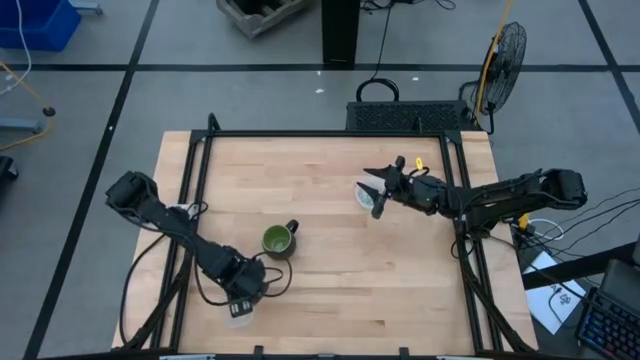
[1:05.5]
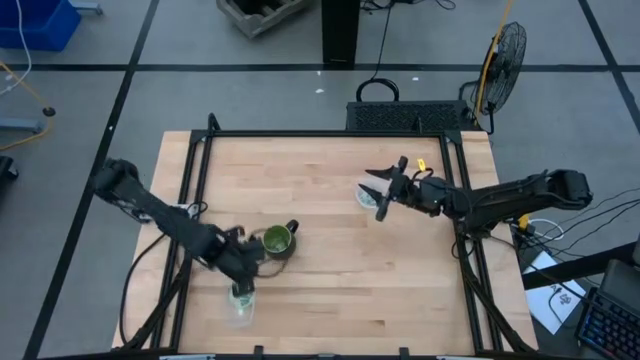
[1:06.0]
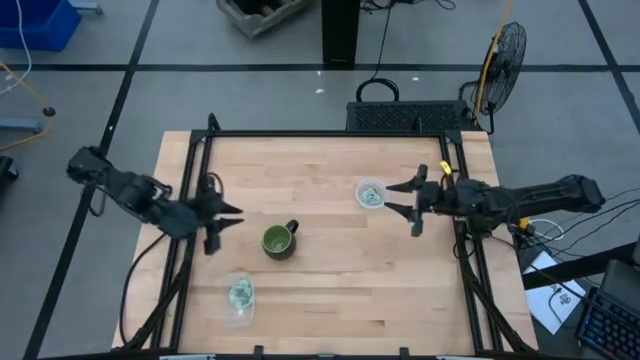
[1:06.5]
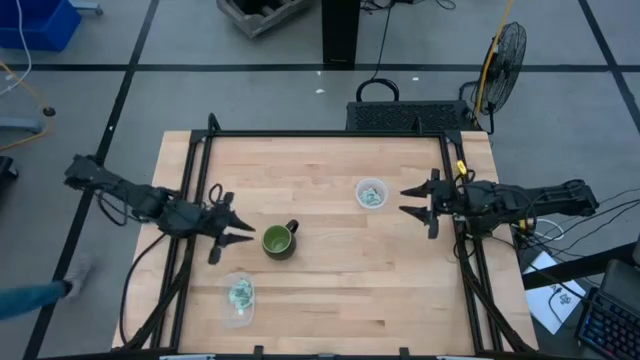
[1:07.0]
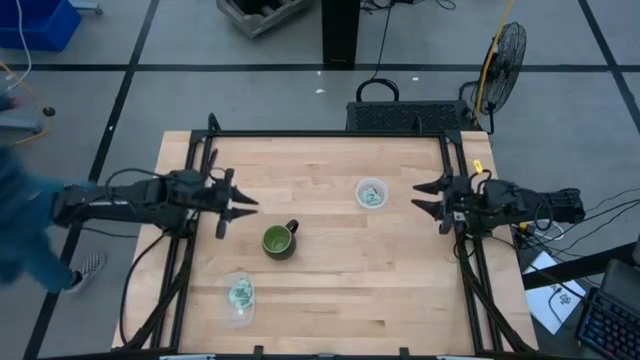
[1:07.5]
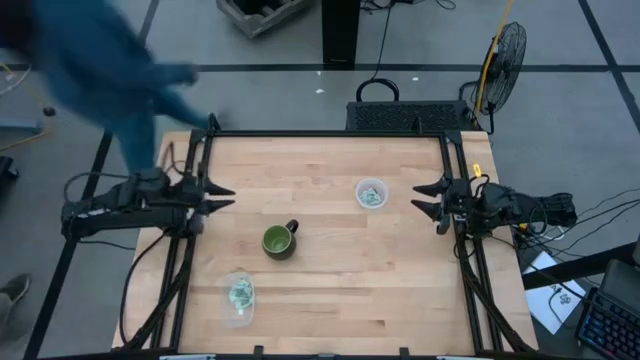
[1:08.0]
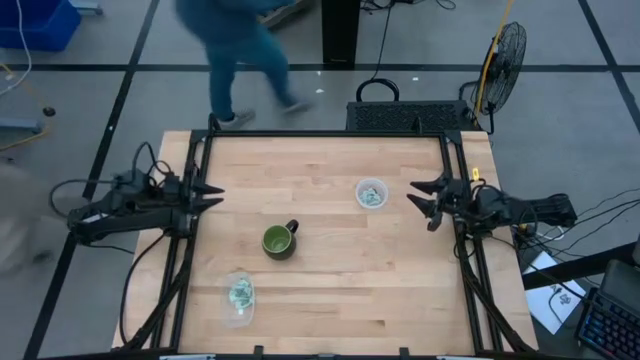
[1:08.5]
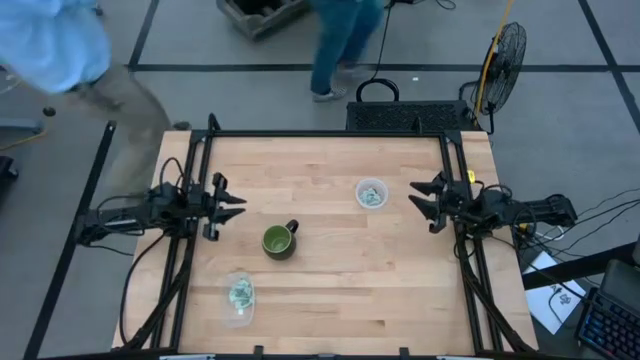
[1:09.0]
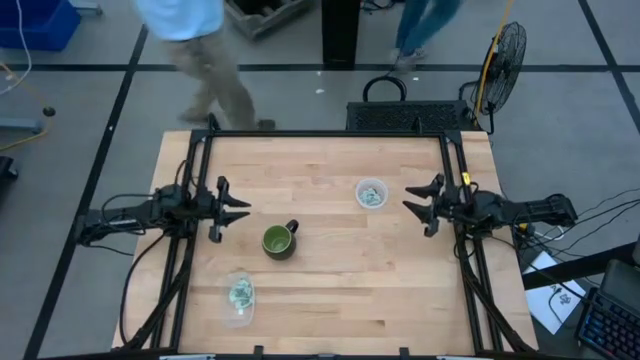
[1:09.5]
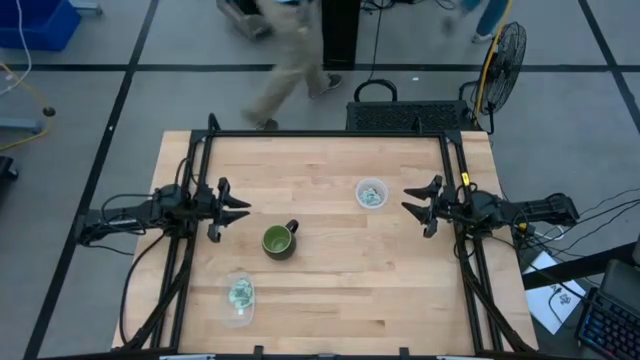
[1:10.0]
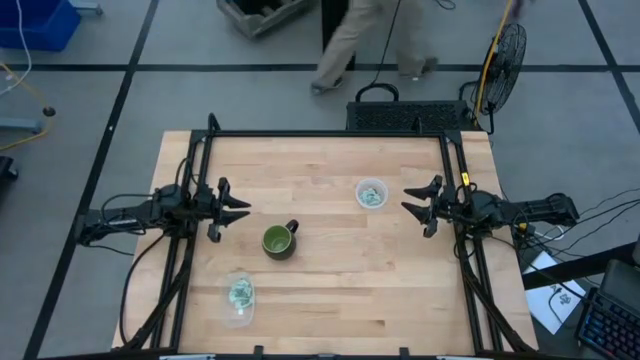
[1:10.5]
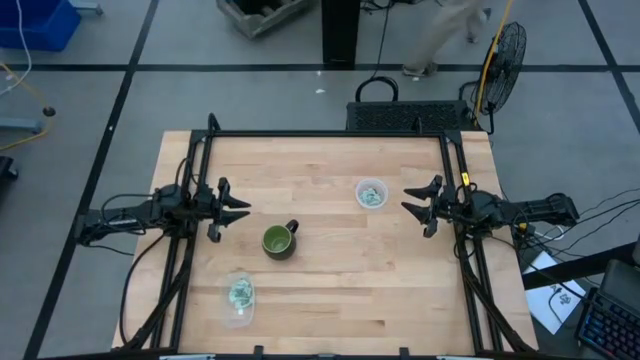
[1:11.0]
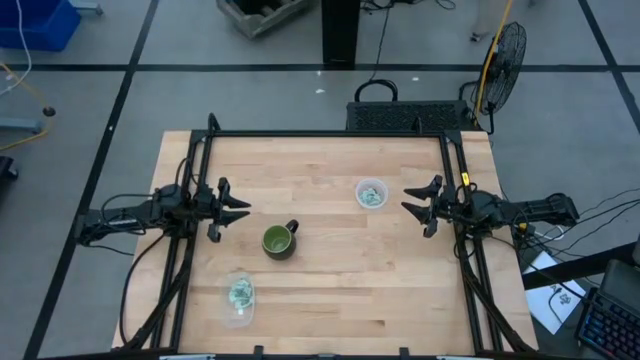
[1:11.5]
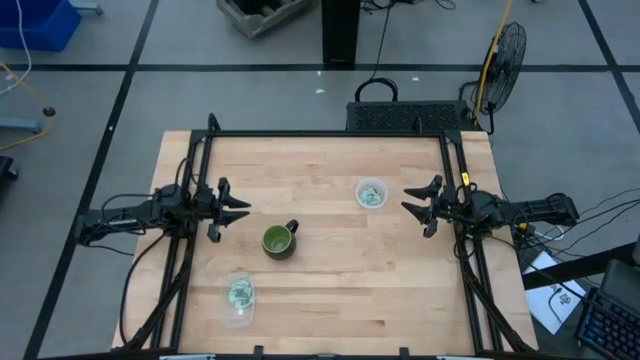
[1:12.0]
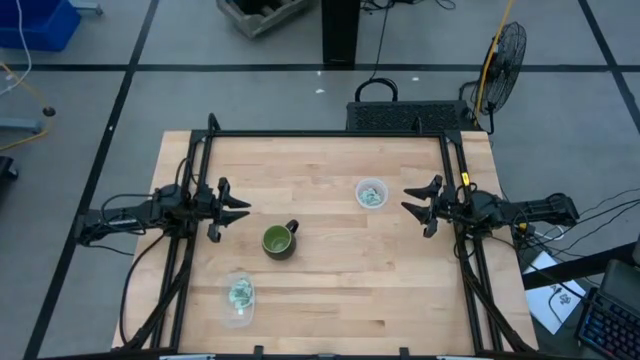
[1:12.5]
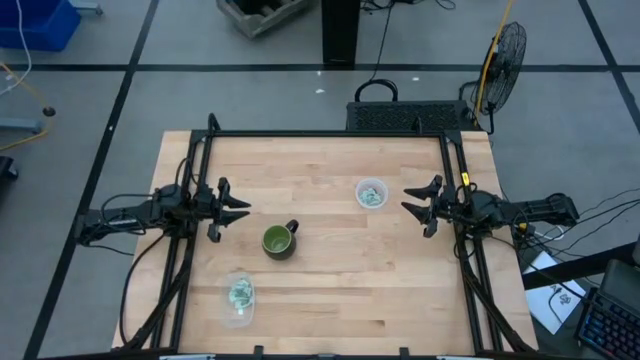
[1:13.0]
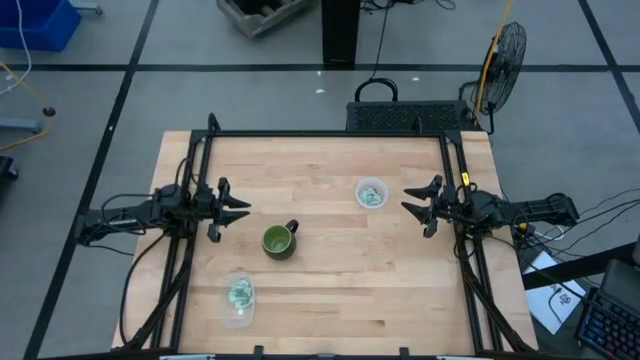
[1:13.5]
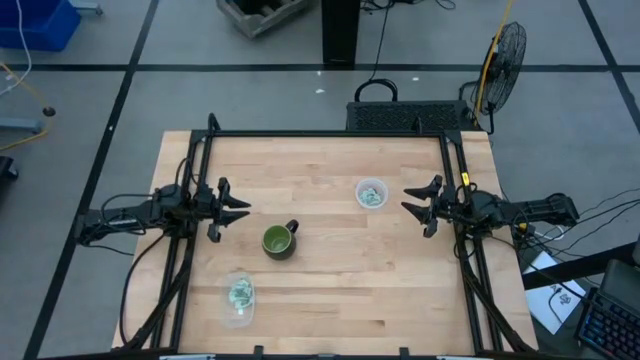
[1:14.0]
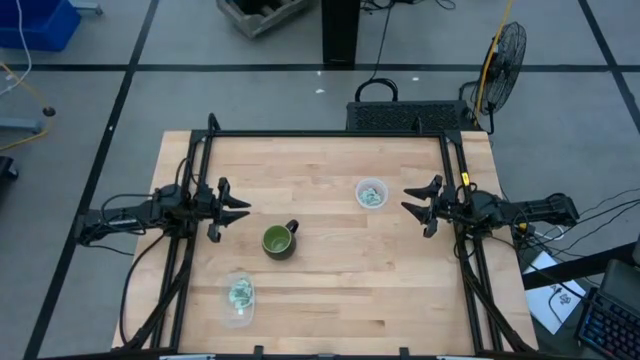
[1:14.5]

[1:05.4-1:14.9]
Task: Pick and place Stevia / Truvia into bins
Return to Home Position

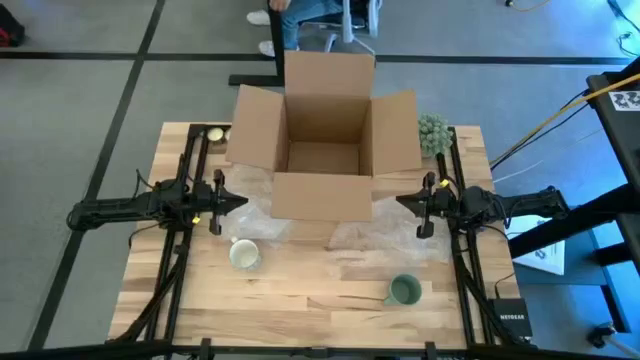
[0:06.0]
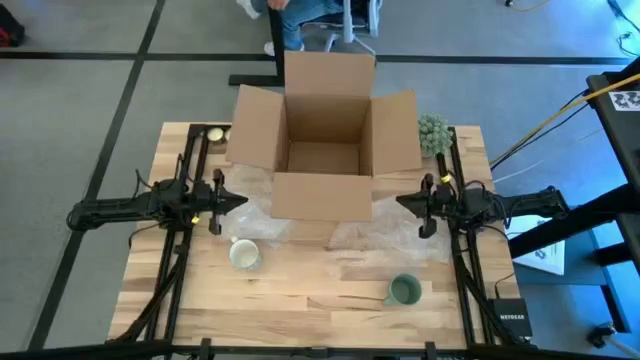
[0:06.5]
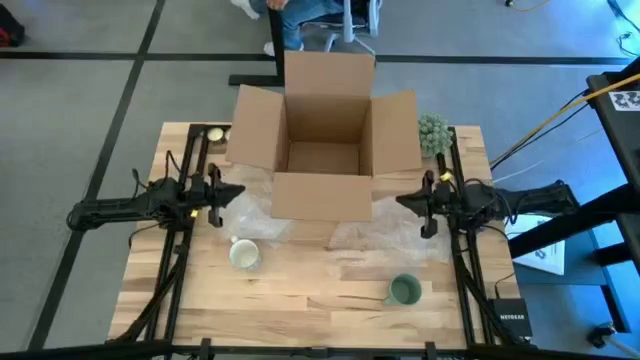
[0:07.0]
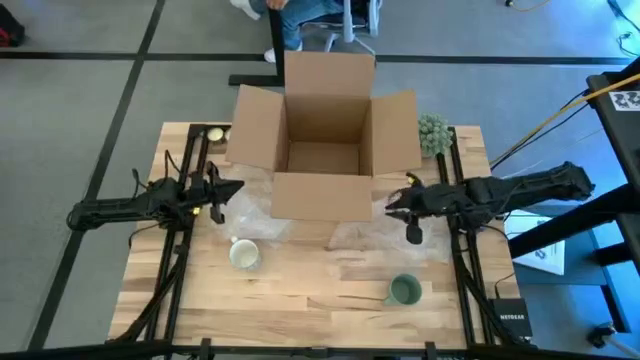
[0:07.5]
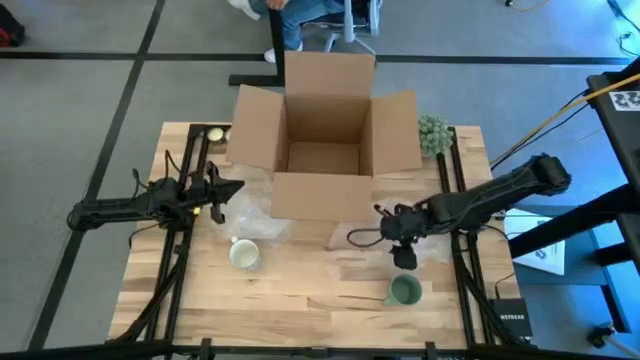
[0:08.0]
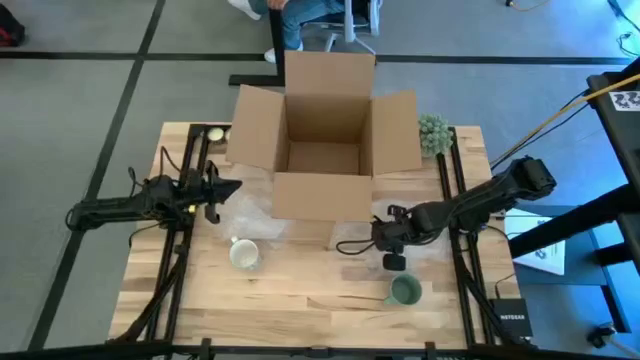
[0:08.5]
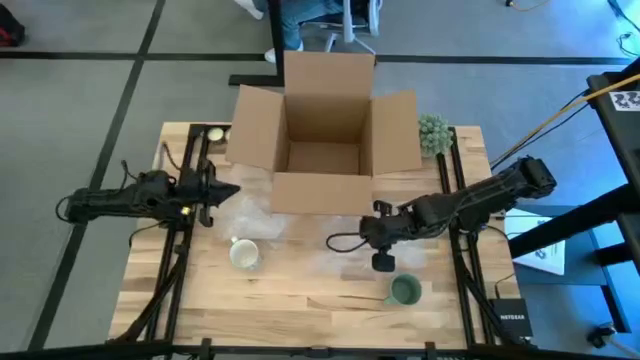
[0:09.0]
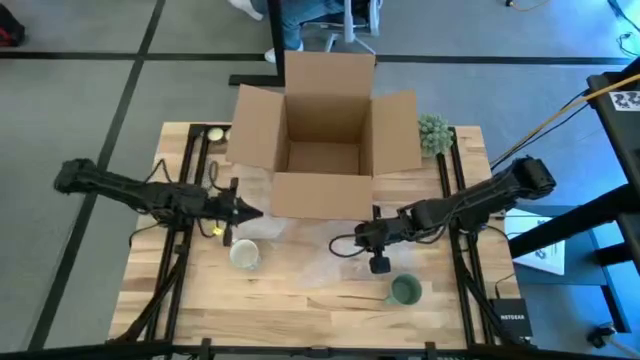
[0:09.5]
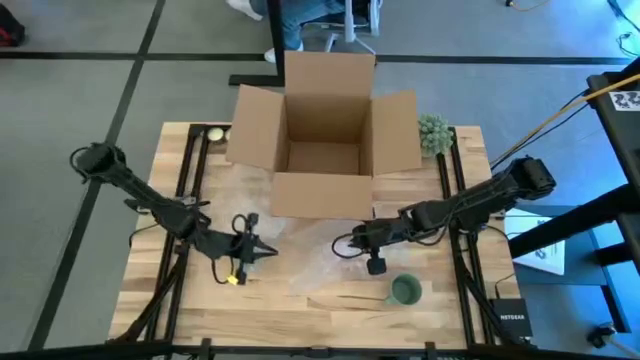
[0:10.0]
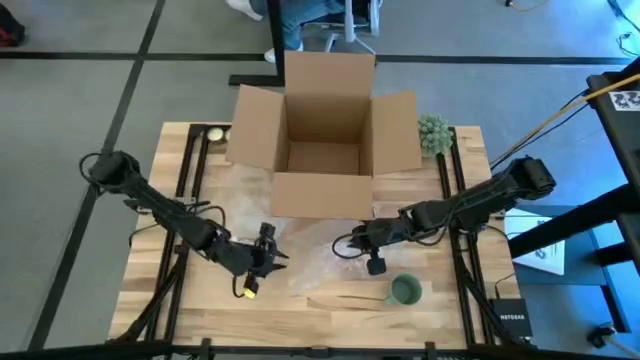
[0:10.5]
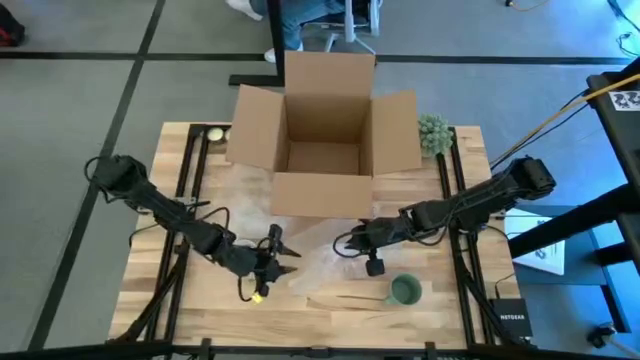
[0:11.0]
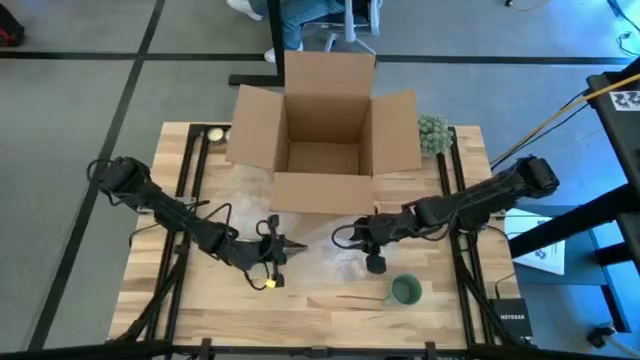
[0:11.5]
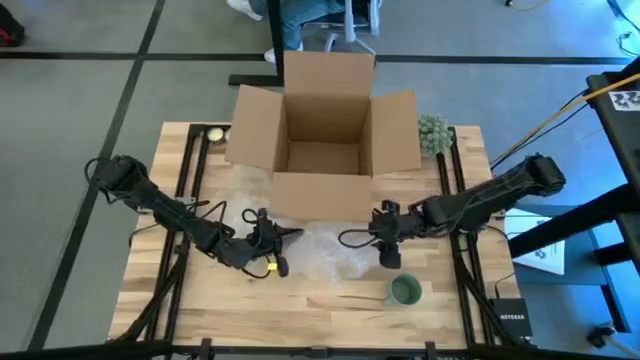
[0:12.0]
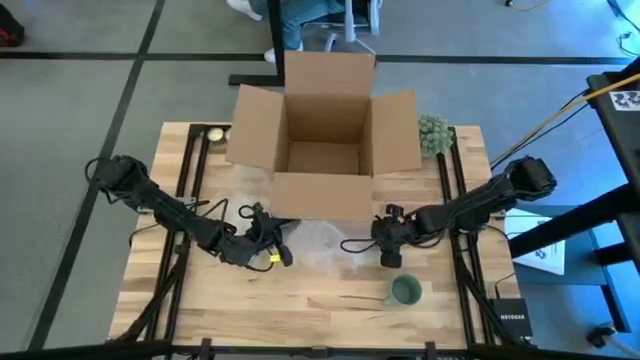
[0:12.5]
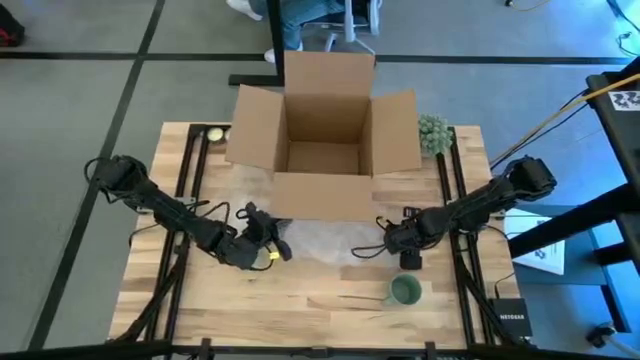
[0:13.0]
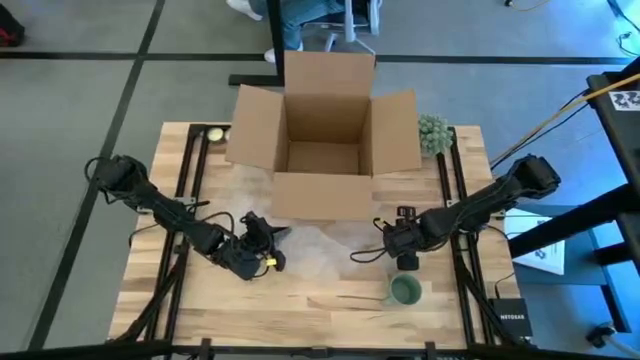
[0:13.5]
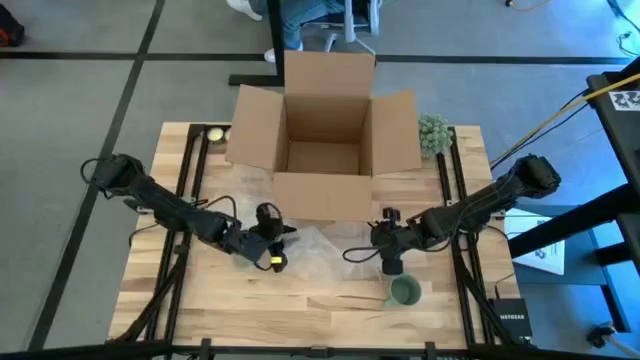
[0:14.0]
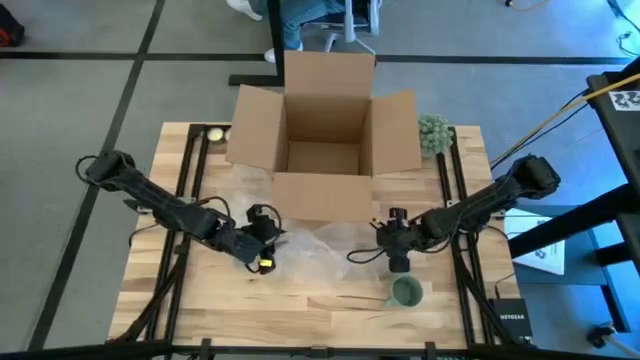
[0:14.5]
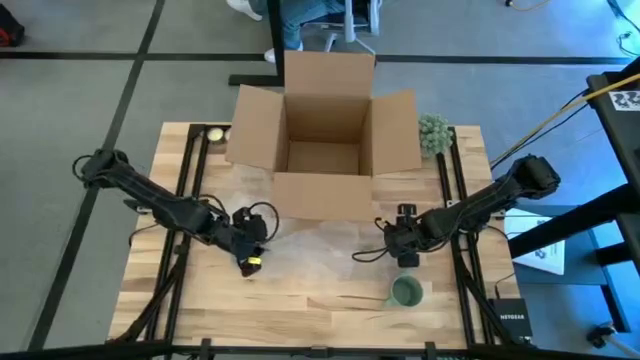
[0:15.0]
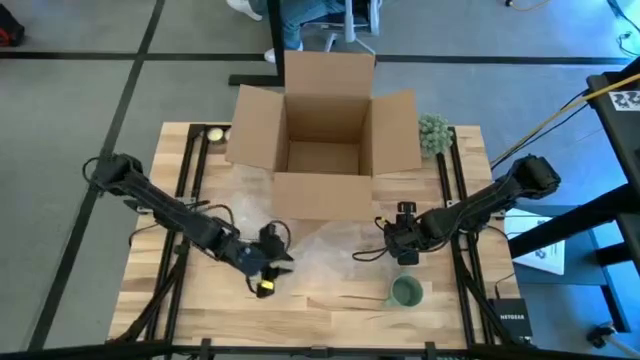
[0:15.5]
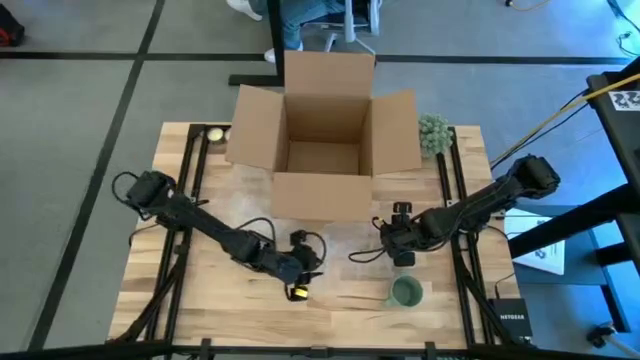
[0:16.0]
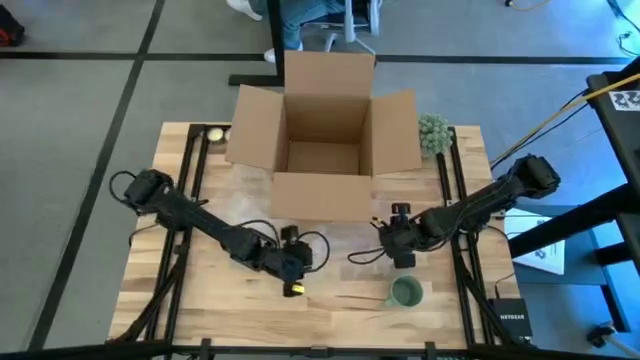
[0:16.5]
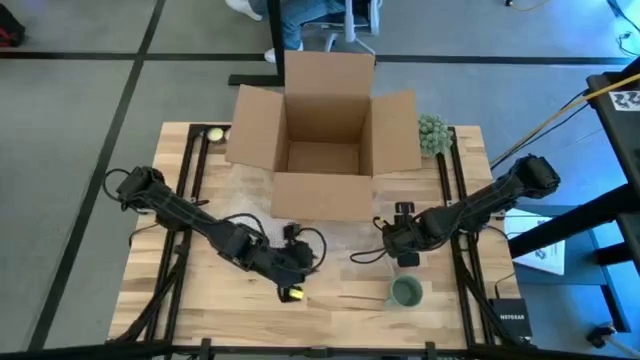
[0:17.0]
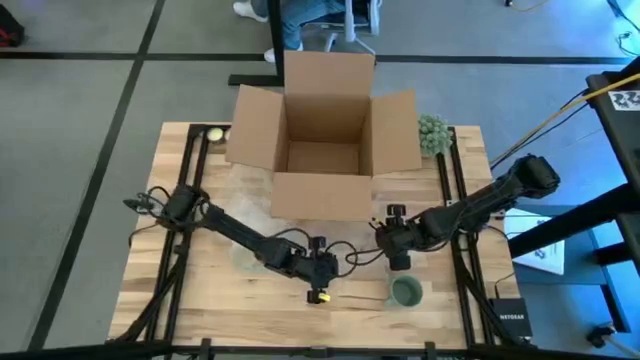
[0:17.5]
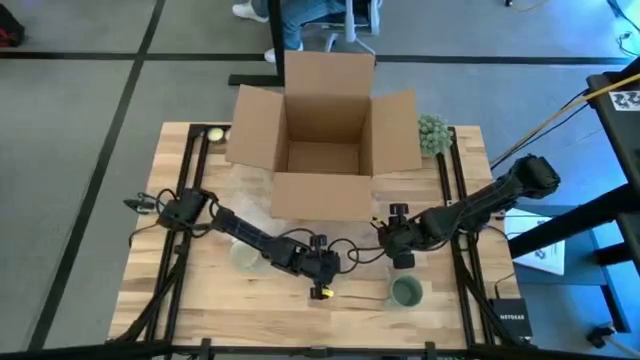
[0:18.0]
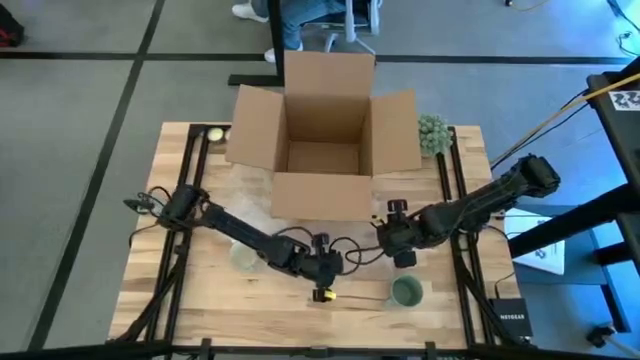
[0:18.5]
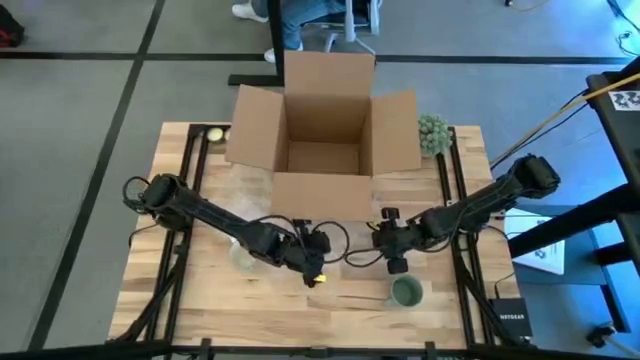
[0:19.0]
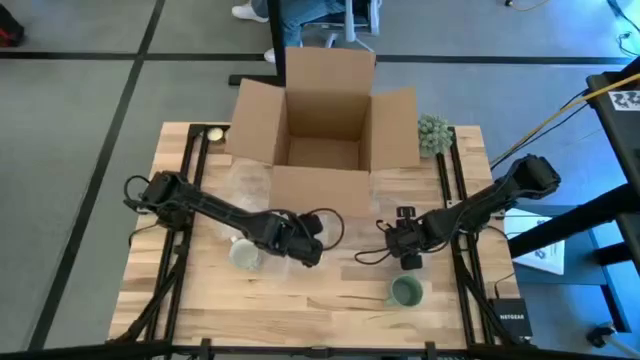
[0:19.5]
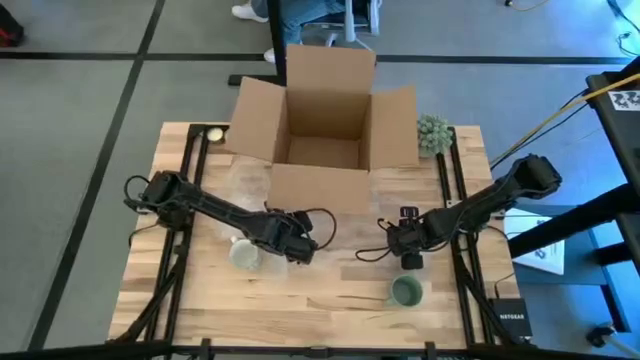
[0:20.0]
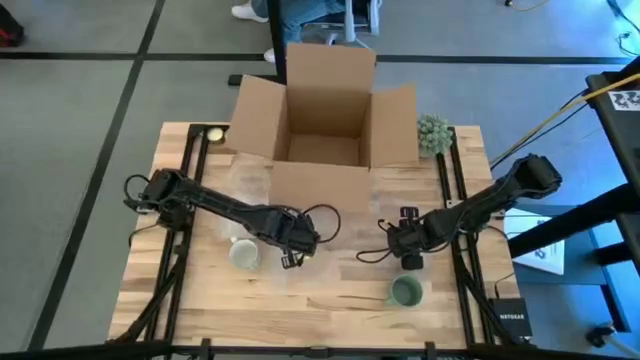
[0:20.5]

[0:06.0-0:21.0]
Task: wrap mug
Prepare the bubble wrap
